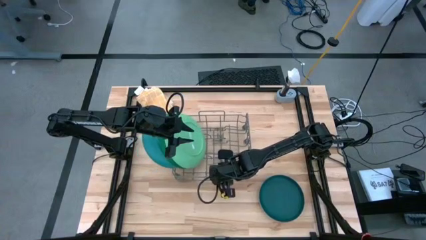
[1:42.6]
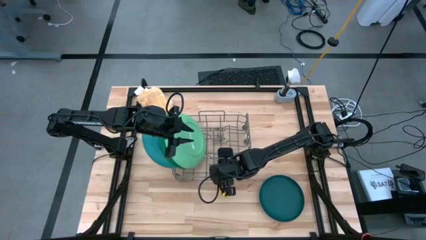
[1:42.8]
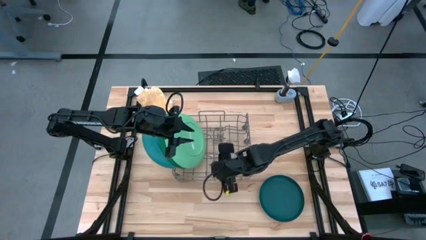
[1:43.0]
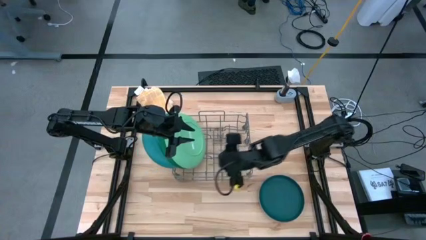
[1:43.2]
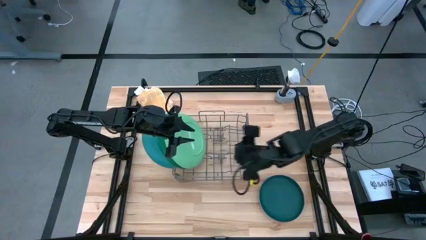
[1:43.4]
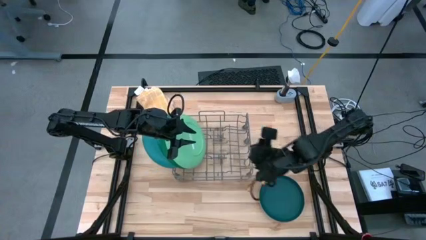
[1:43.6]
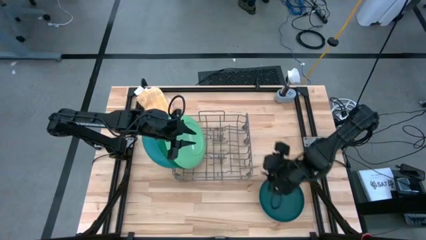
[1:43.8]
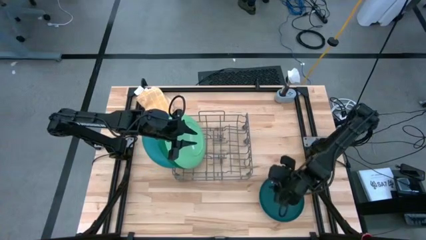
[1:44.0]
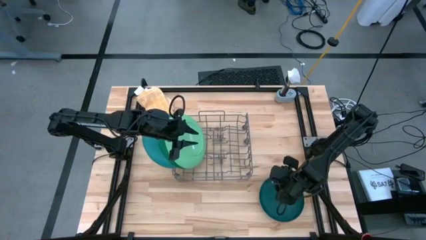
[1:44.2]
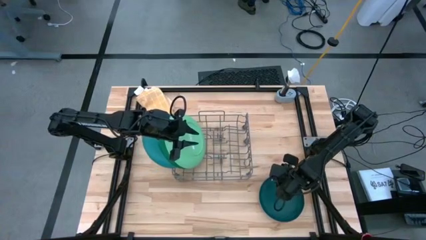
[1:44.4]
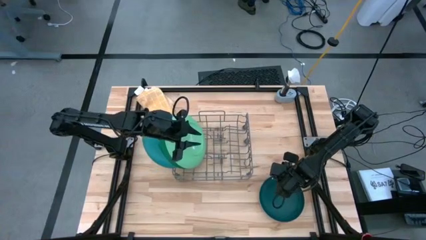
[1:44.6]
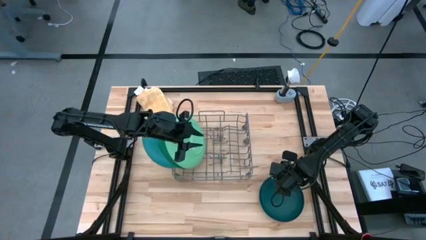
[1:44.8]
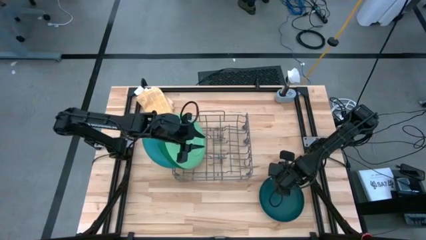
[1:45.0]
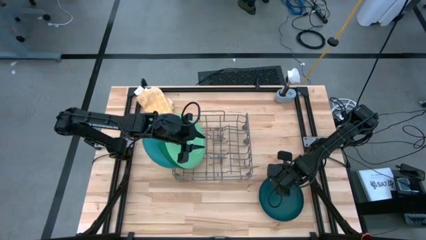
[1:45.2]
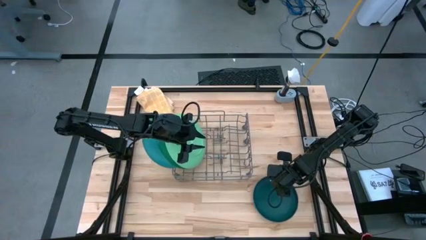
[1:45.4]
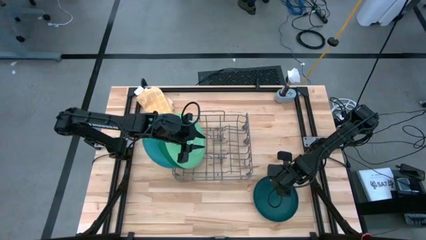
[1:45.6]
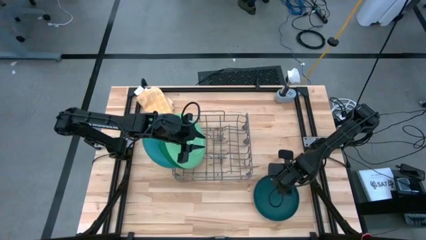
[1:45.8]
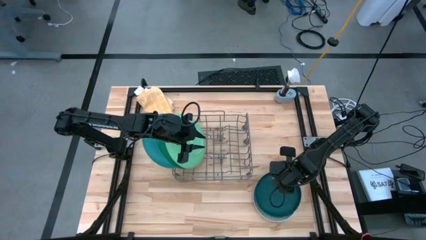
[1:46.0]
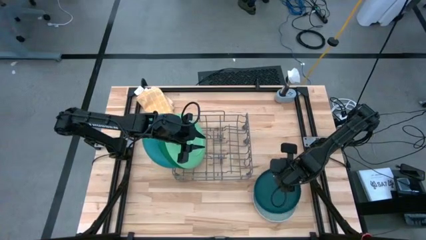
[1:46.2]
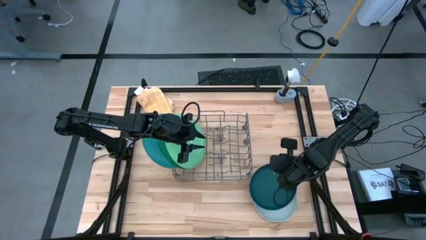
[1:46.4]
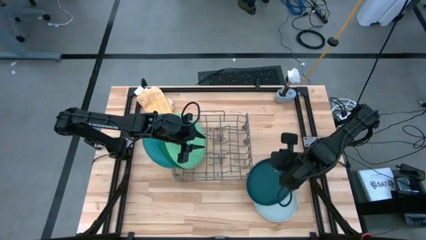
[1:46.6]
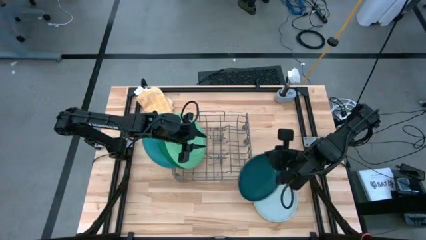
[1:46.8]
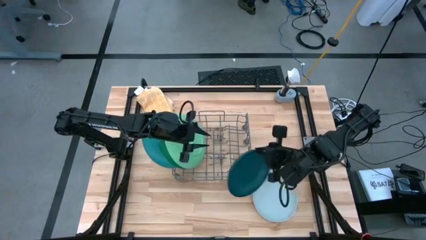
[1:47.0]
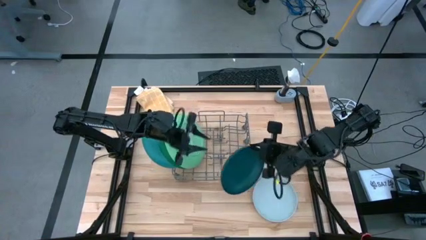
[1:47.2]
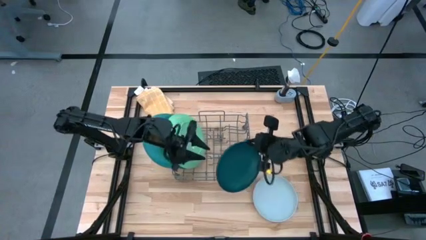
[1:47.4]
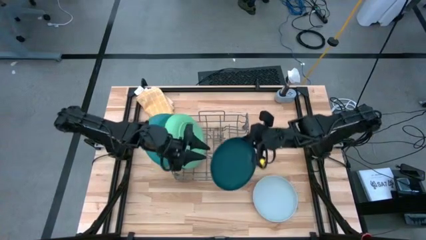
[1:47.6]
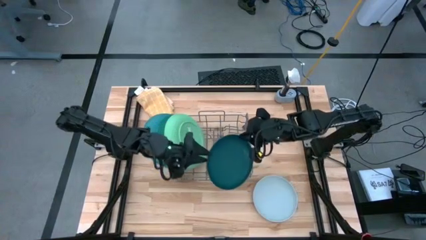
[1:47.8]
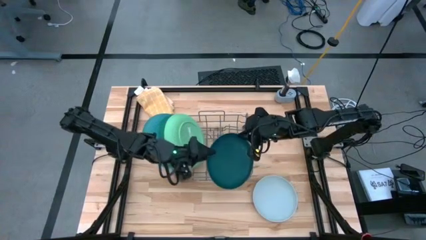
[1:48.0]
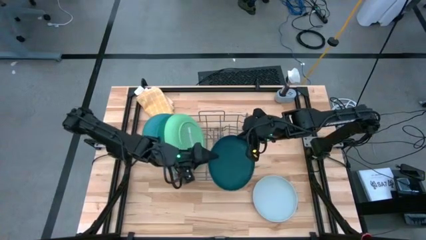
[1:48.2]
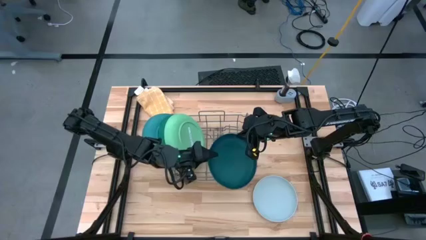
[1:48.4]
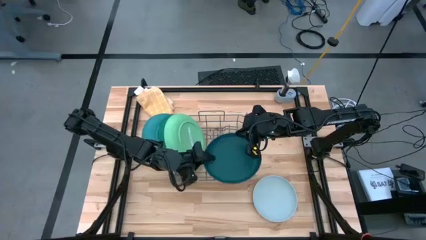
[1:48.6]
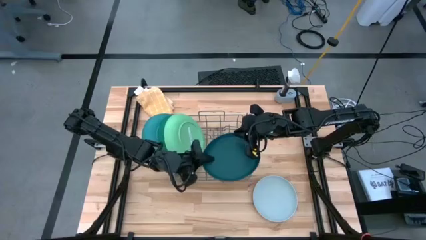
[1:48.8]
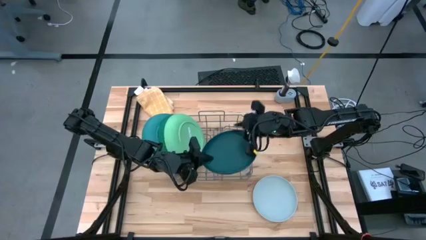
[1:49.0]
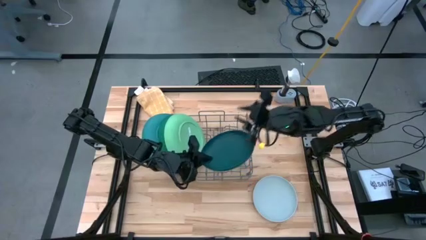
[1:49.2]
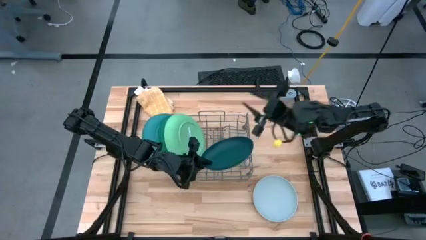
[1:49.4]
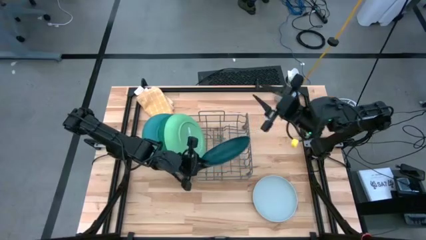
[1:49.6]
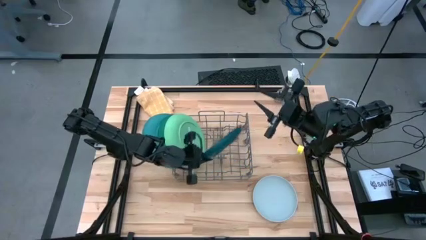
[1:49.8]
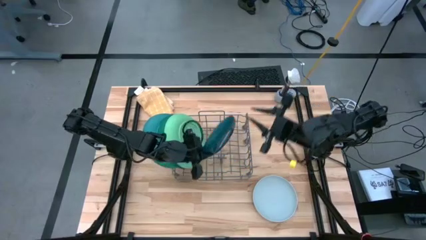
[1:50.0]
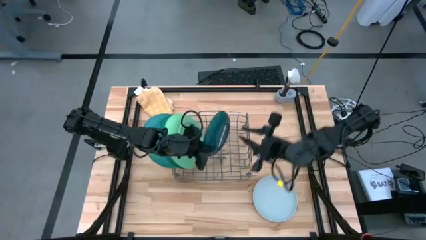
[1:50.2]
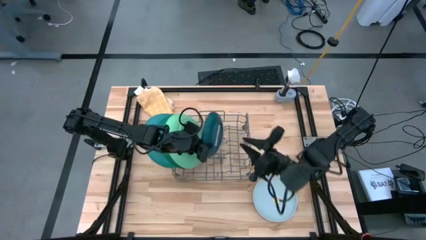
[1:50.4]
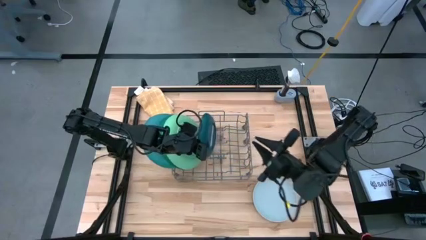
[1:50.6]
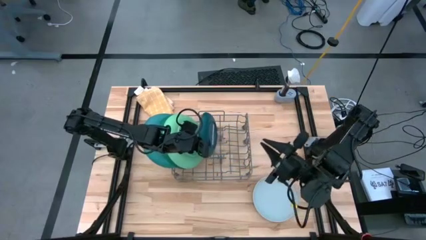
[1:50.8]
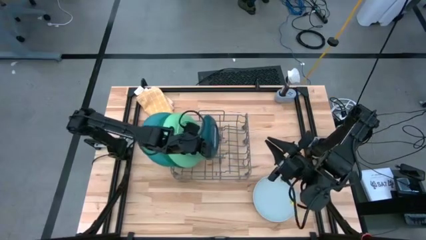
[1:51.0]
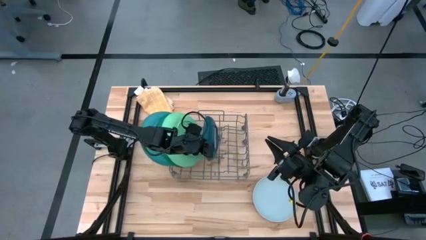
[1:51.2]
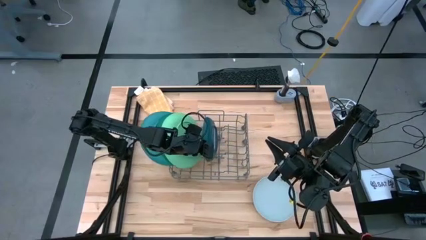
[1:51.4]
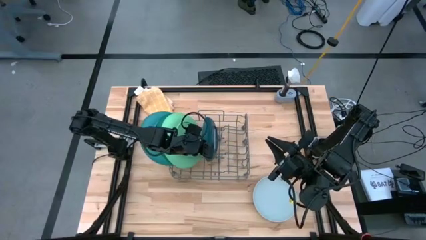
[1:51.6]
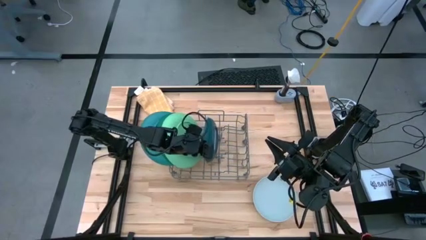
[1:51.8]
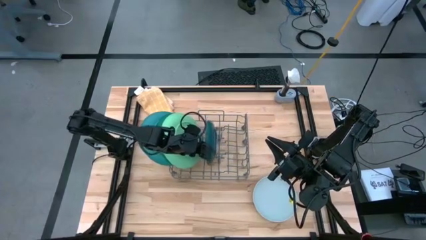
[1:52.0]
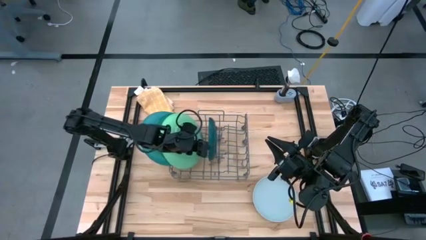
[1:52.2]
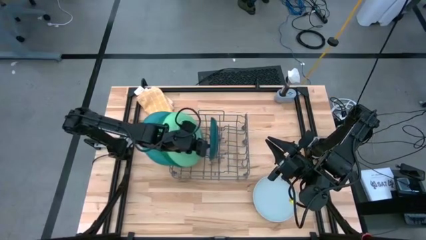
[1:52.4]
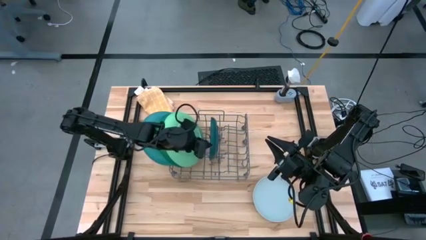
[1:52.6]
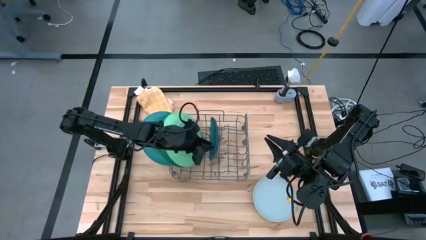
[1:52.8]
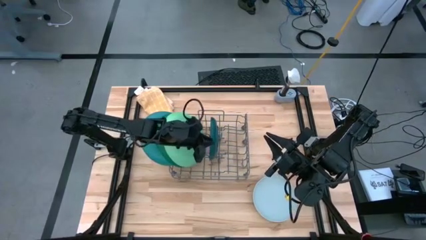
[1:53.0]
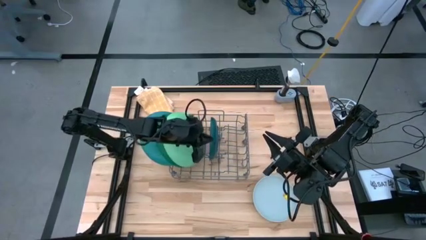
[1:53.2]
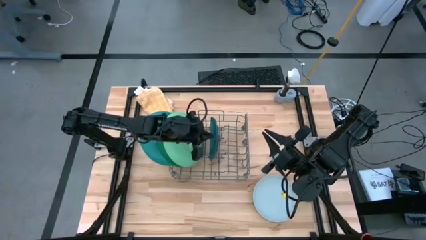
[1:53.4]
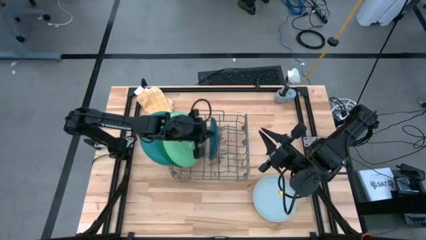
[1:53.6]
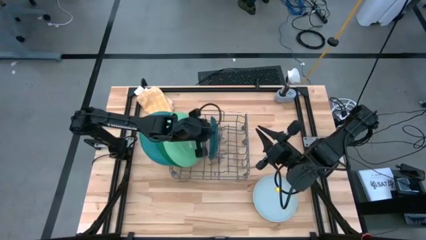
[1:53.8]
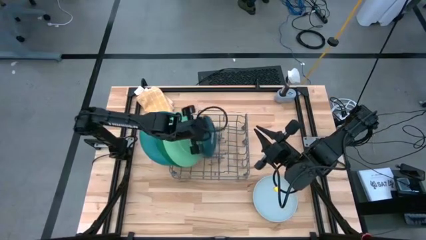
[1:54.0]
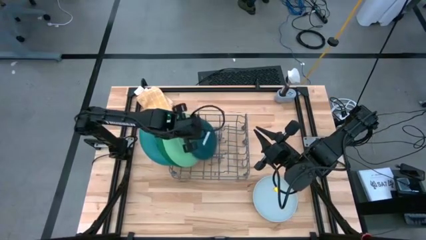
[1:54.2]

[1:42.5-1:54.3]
Task: Sort dishes
Put the dark blue plate into the dishwasher rack
